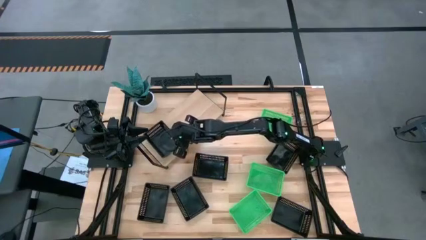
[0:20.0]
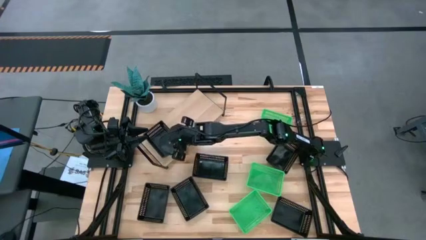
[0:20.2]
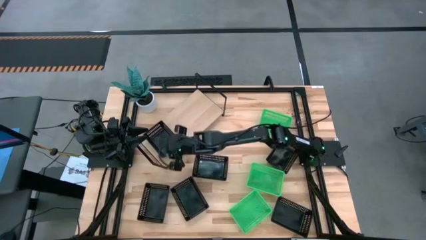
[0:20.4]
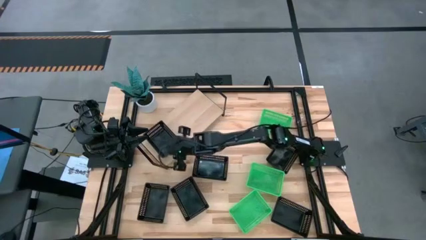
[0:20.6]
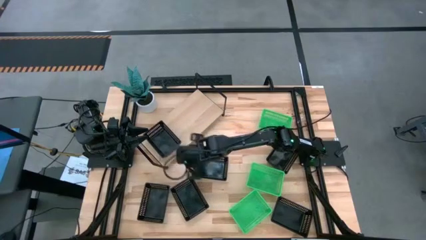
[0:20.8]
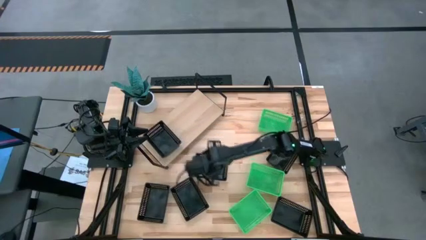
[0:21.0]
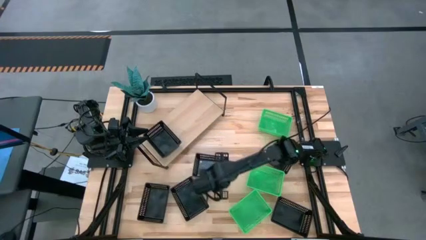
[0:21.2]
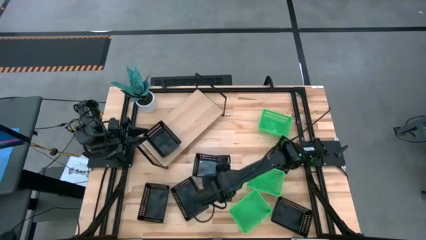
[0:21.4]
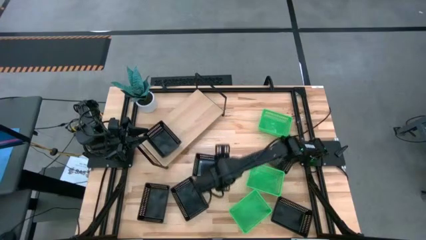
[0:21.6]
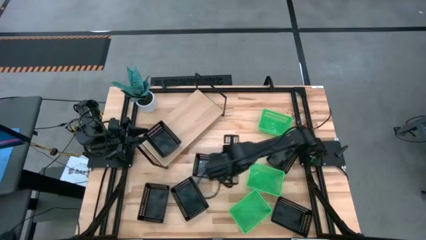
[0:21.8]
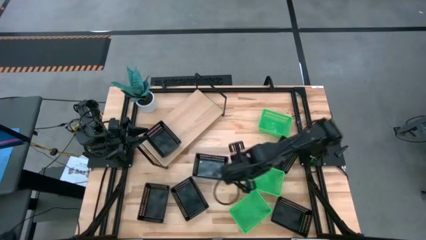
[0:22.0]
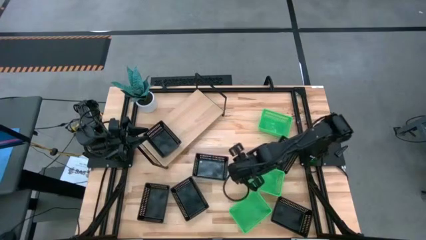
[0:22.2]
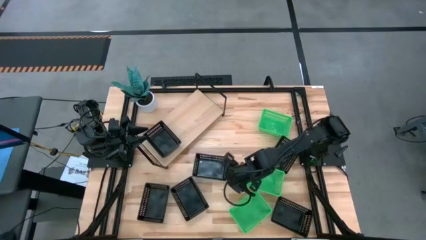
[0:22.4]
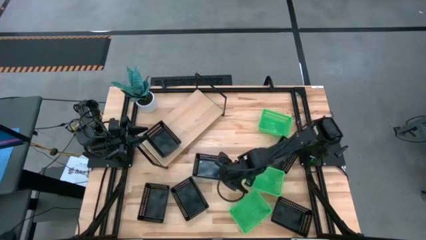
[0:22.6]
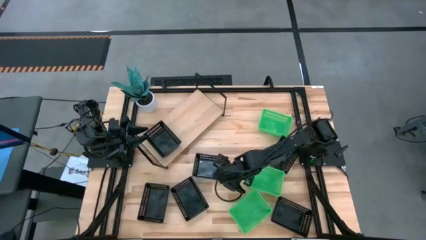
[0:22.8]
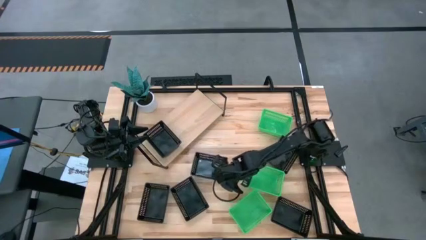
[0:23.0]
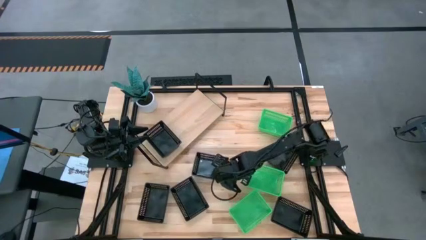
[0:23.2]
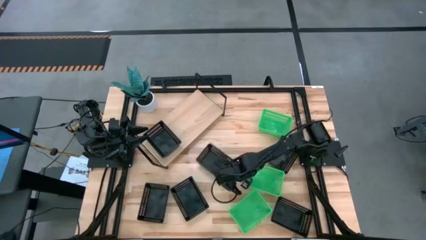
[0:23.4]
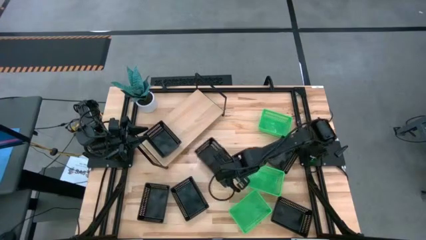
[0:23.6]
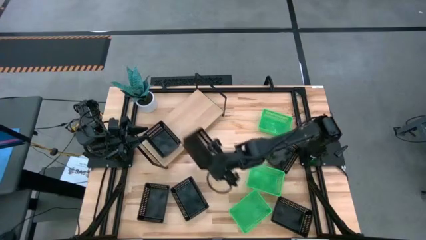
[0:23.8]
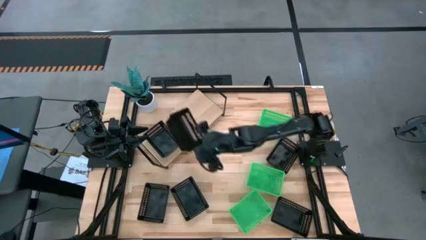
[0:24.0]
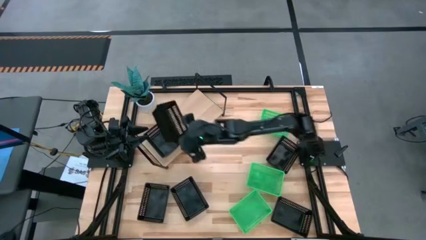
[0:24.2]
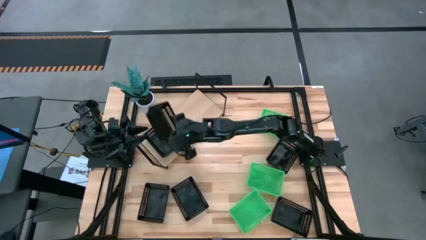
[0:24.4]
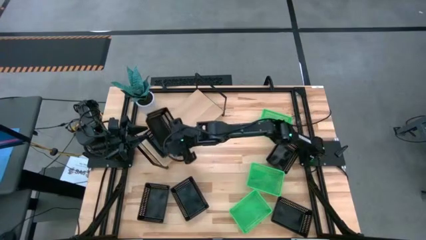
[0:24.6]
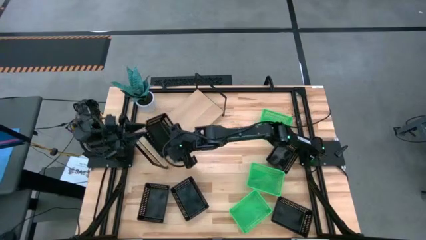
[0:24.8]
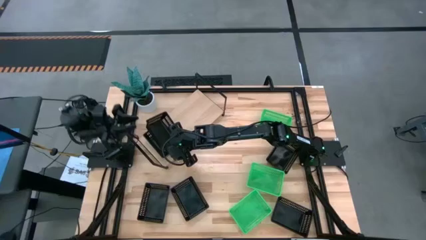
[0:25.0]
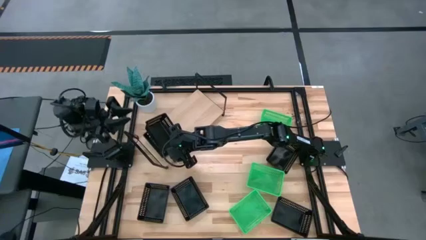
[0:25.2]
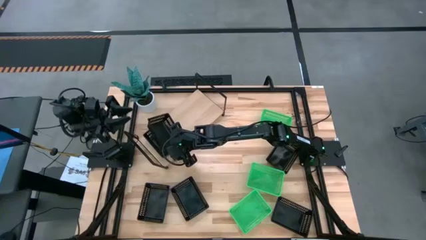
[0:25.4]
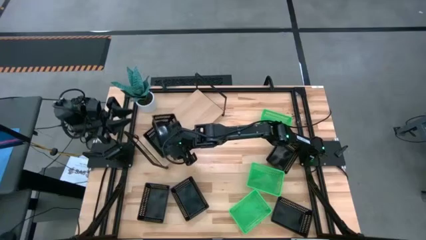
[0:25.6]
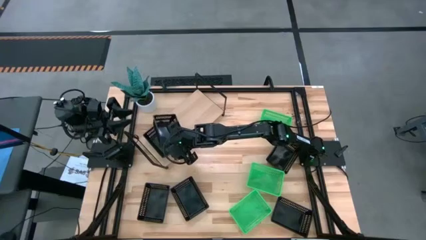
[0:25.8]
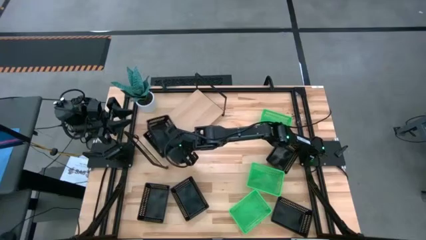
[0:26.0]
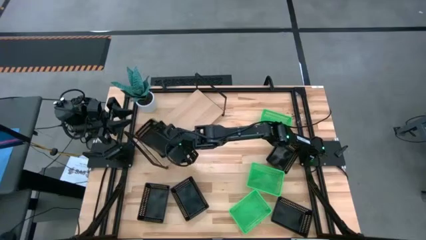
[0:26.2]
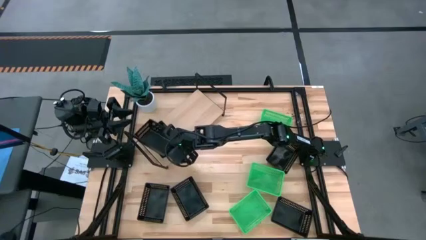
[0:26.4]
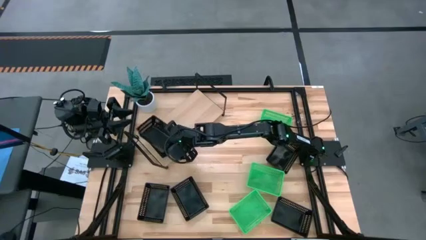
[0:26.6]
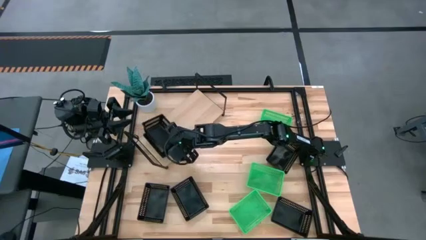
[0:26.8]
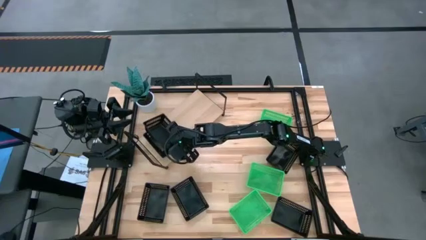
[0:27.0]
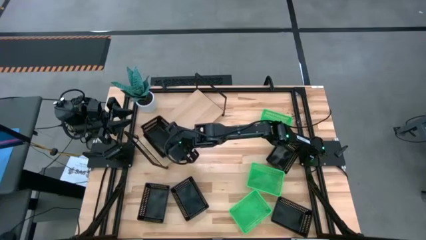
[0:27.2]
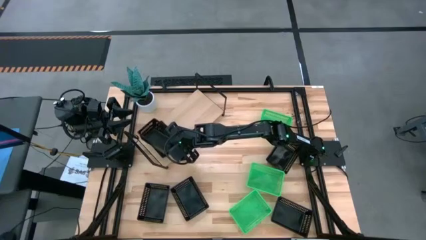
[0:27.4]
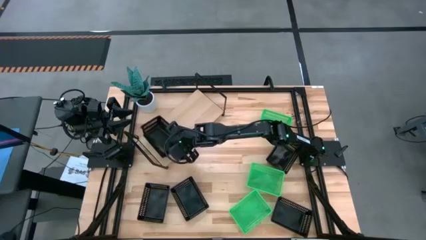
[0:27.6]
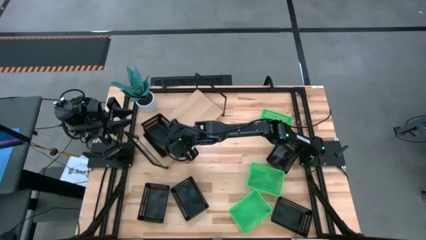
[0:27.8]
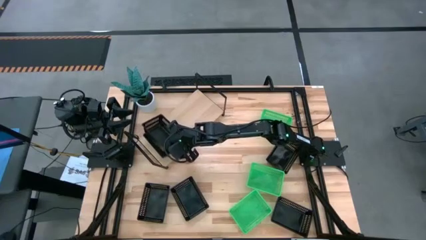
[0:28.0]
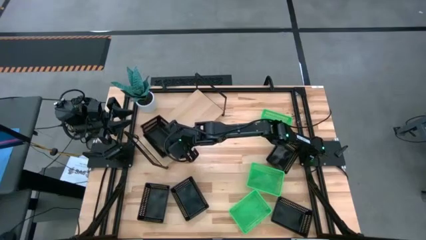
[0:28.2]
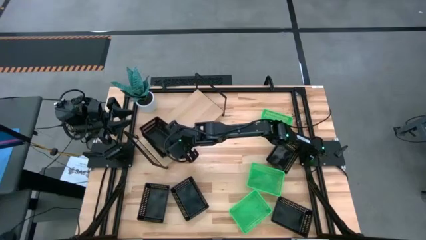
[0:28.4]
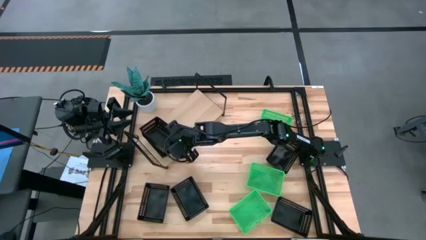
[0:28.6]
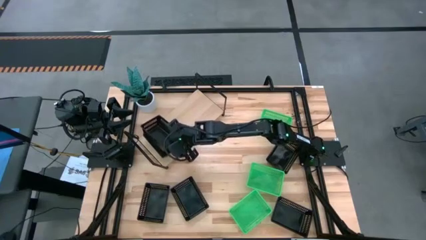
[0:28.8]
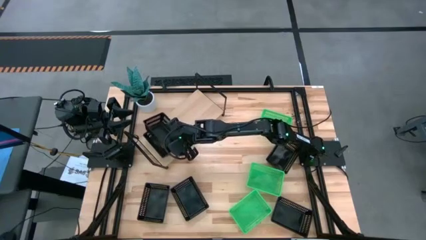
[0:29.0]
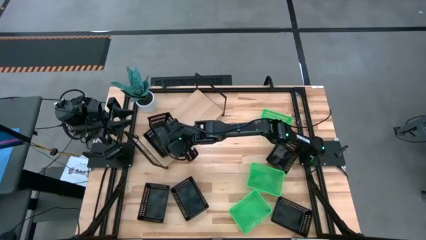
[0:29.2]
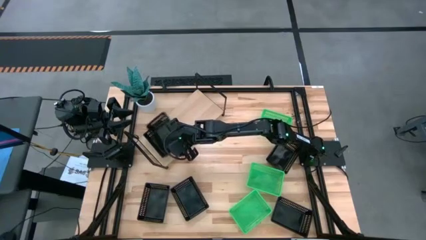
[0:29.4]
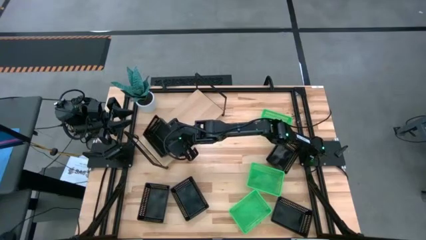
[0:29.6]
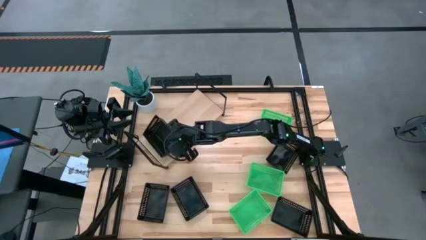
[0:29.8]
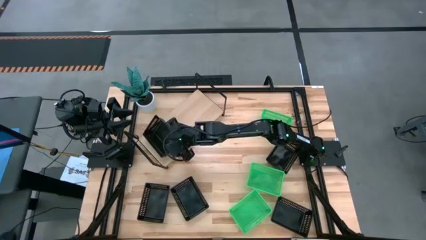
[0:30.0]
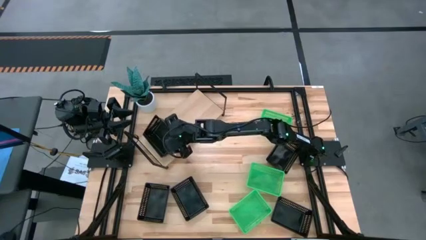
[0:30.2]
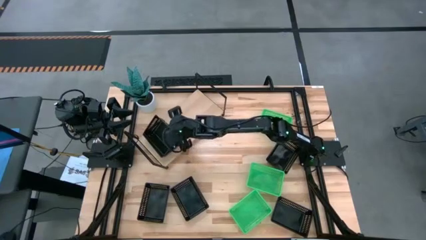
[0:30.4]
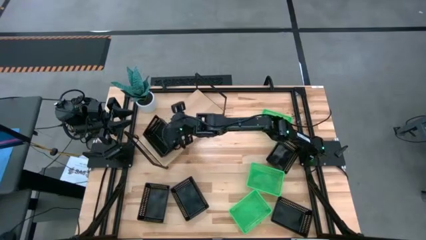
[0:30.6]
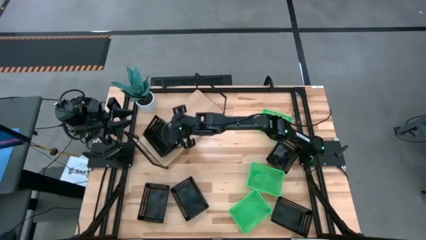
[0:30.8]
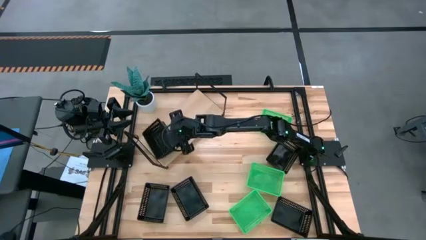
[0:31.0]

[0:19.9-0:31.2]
Task: Stack baskets on shelf by color
Stack the black bin on the top of the black bin on the shelf

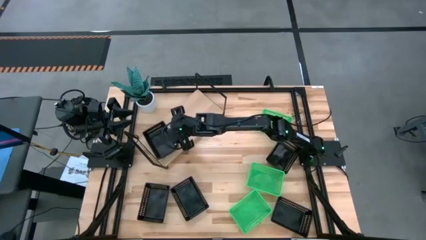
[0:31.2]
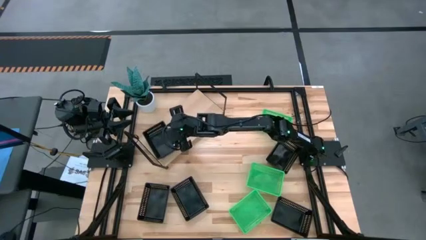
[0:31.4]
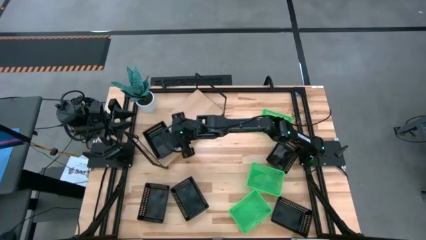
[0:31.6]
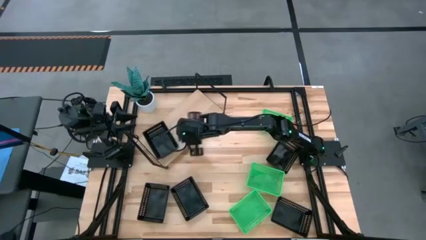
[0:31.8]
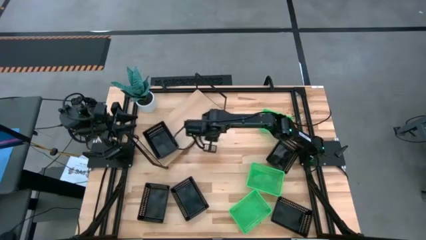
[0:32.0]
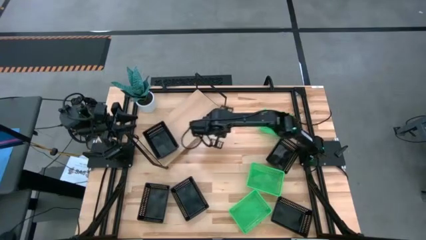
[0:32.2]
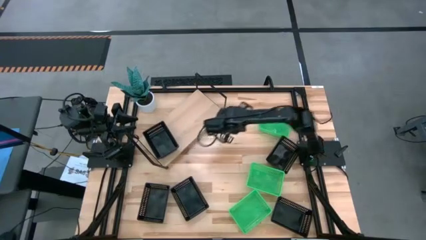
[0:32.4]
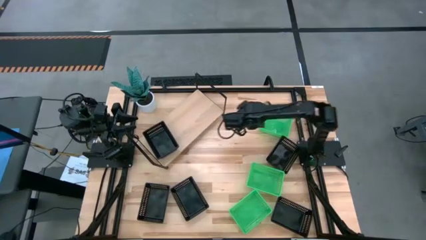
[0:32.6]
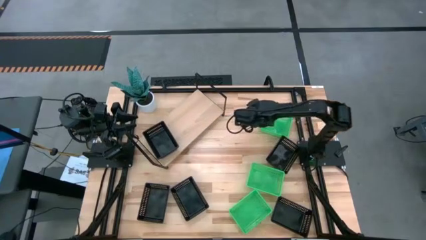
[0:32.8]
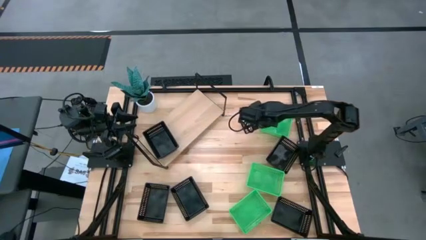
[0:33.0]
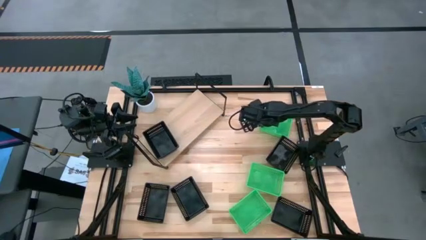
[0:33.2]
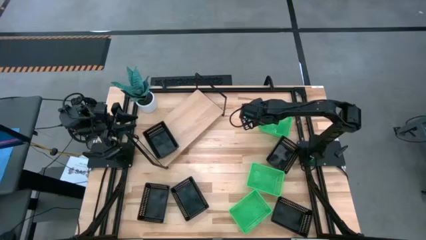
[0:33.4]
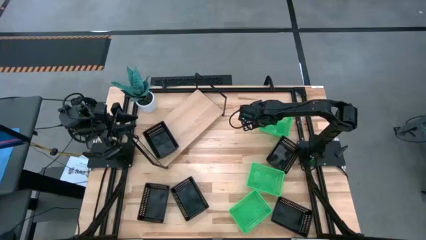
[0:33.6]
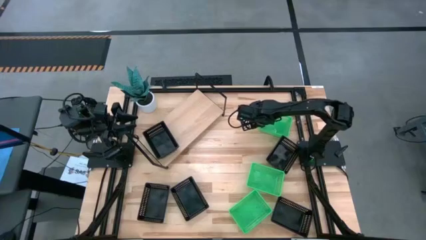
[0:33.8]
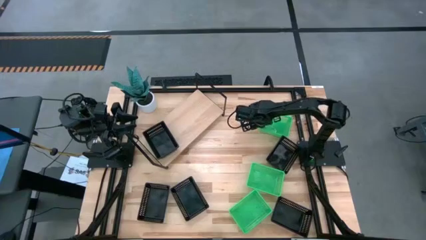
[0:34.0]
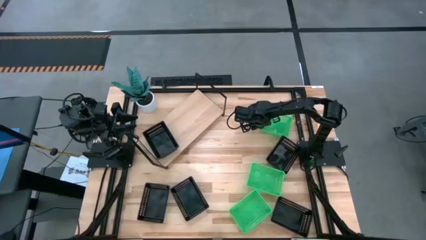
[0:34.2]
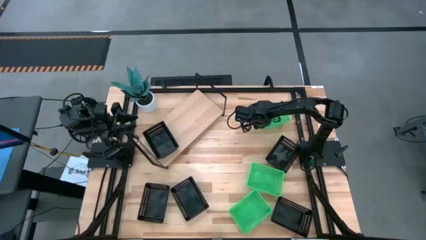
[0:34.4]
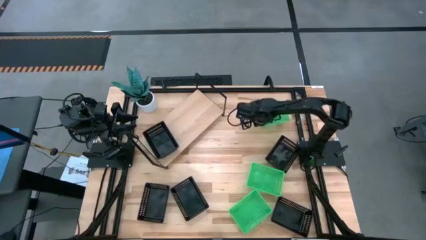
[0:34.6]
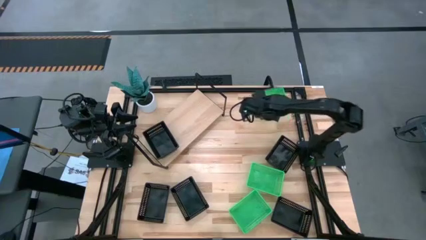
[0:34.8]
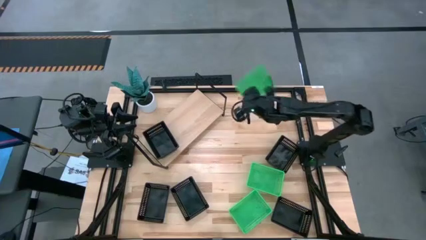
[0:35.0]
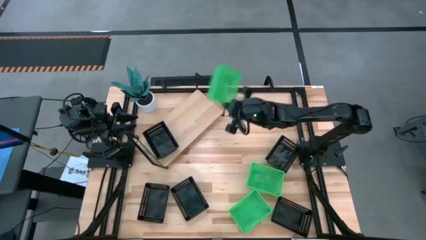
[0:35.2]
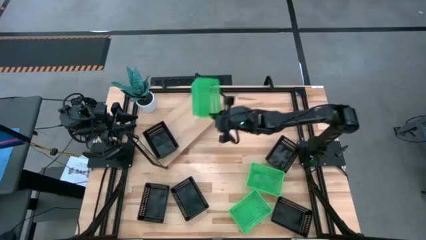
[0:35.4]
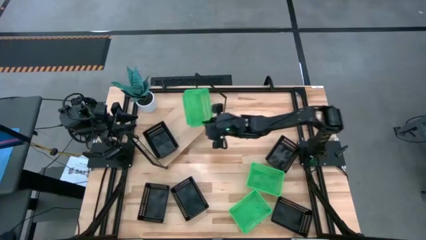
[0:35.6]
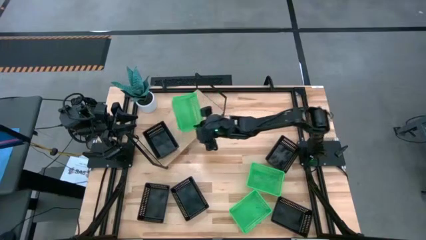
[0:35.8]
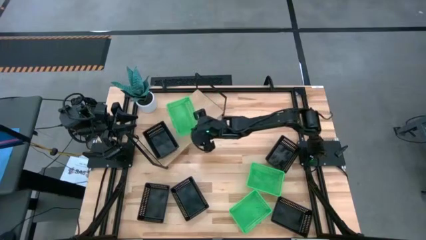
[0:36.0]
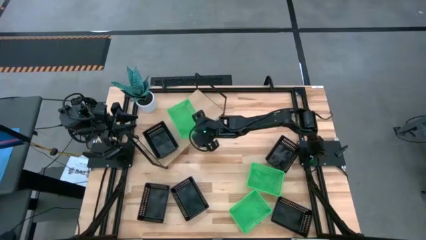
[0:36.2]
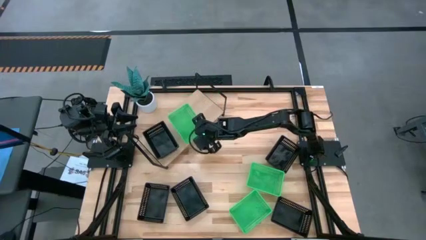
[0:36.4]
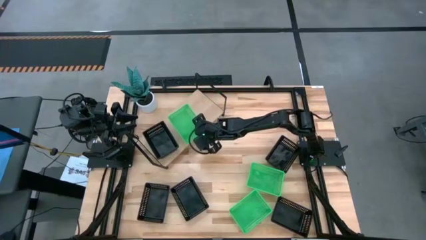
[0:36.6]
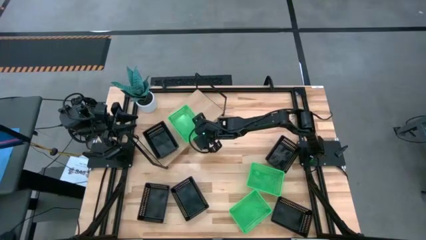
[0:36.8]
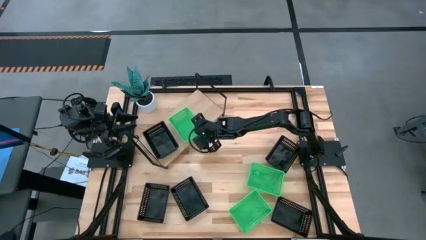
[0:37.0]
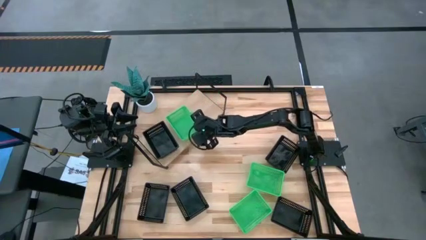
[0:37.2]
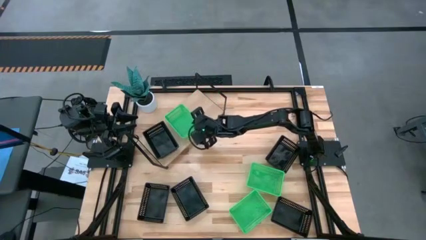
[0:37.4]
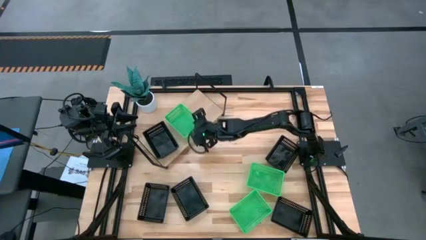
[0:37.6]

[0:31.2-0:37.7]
Put the green bin on the shelf
